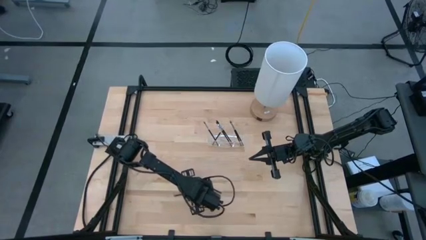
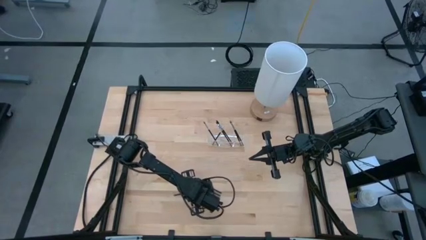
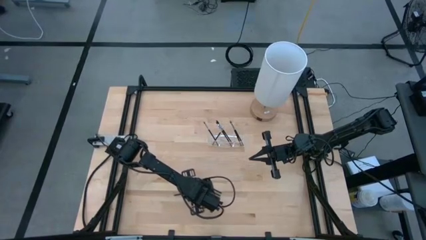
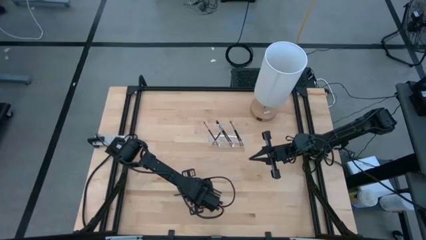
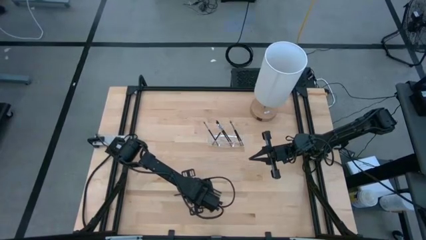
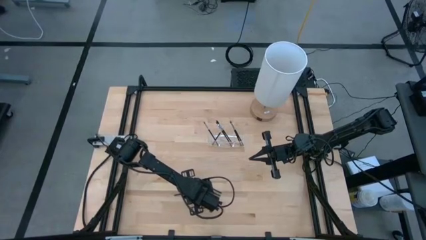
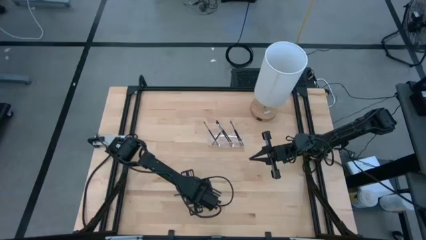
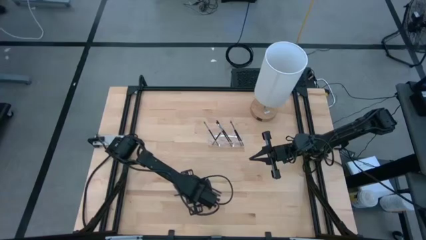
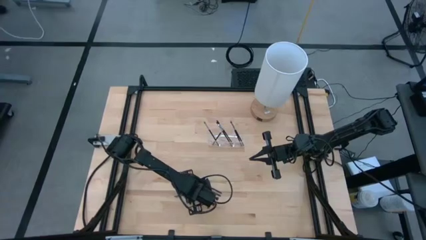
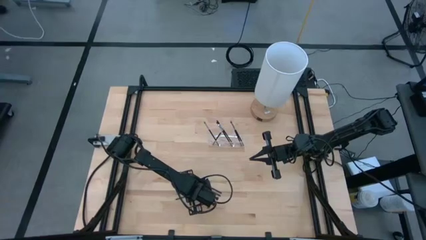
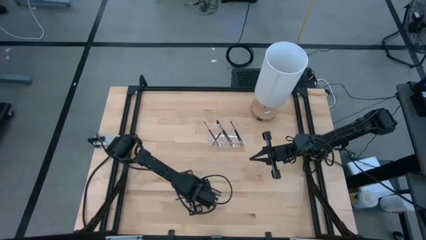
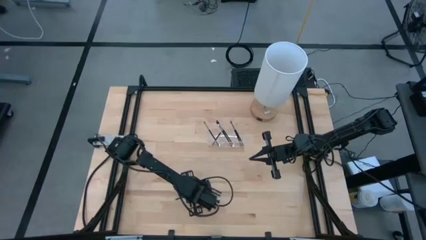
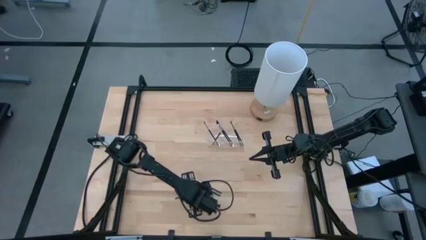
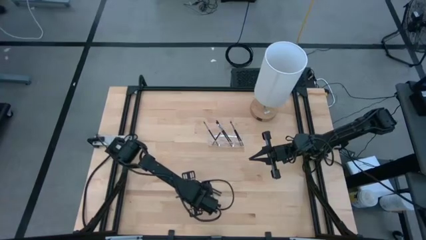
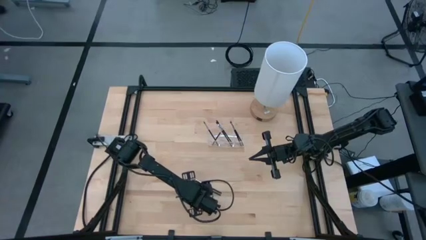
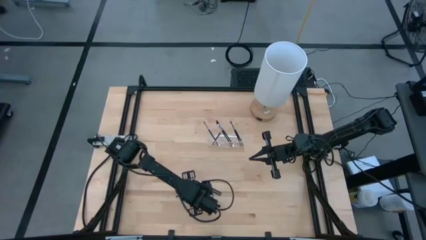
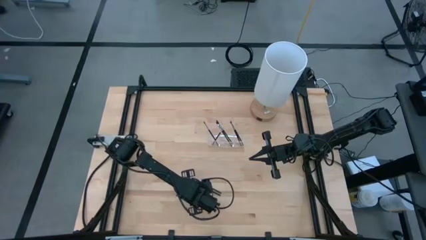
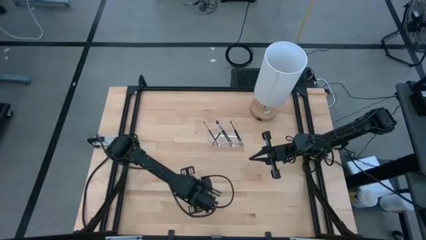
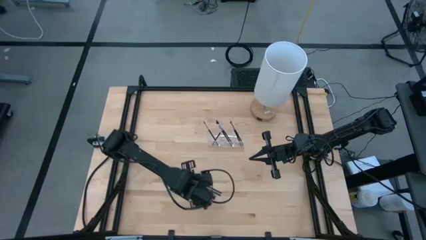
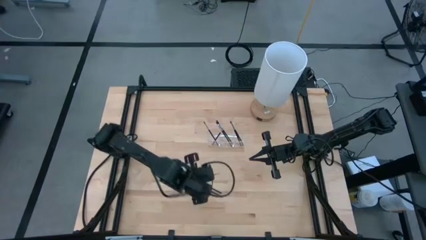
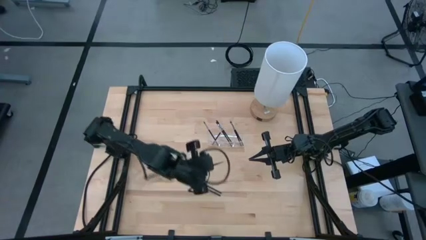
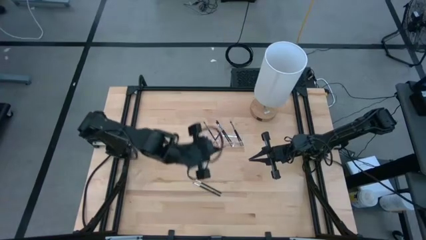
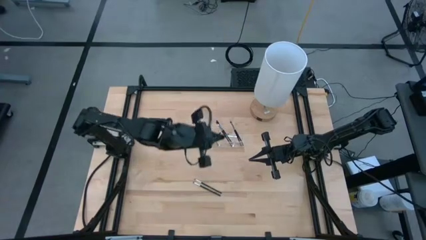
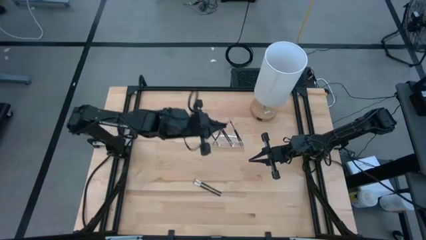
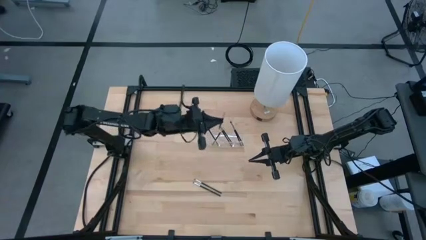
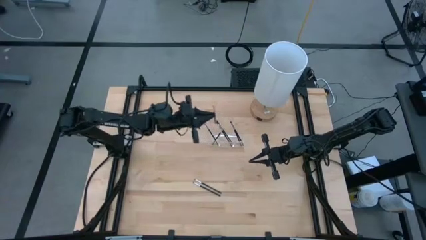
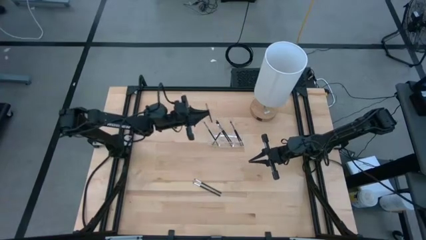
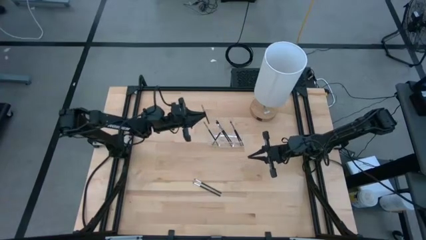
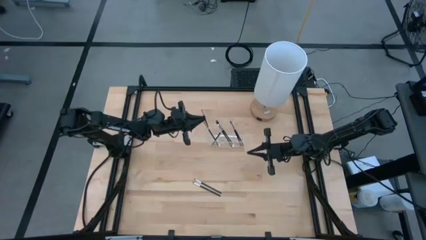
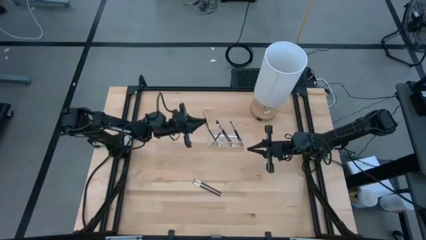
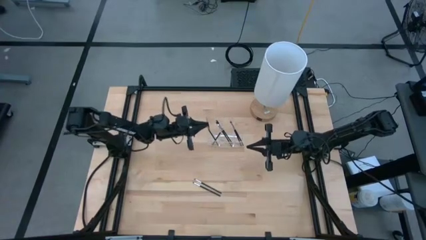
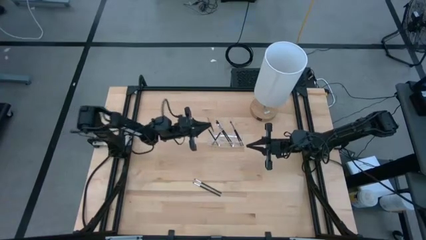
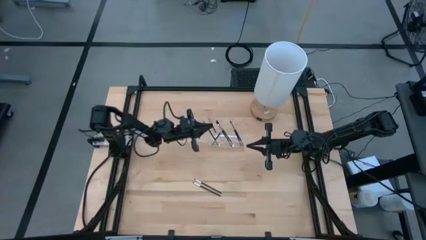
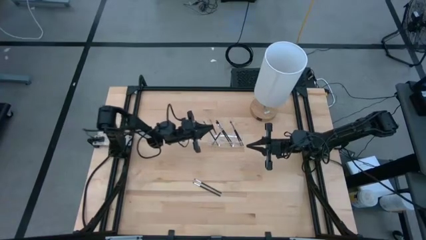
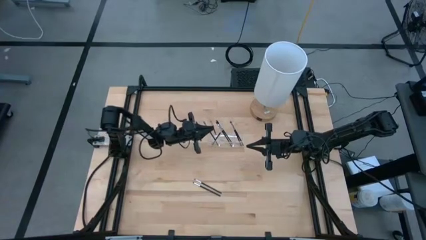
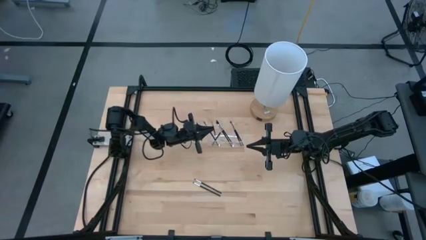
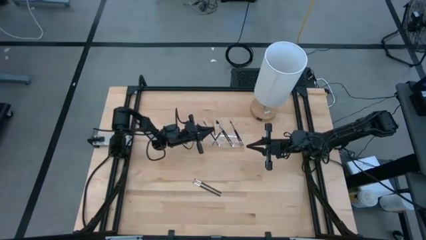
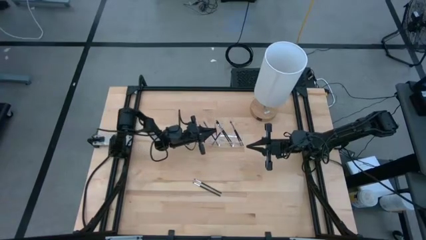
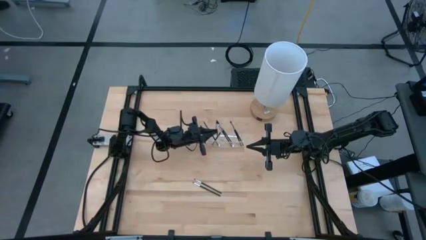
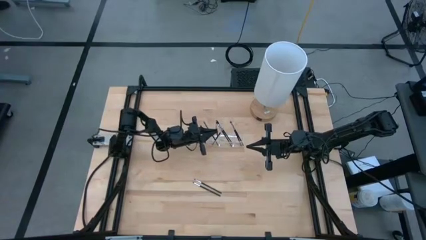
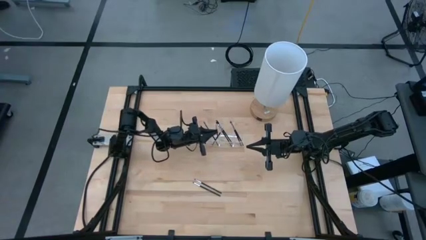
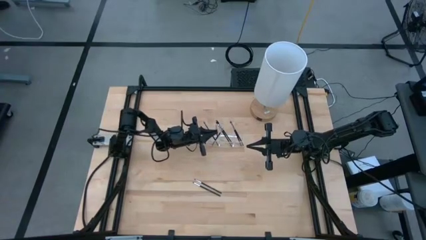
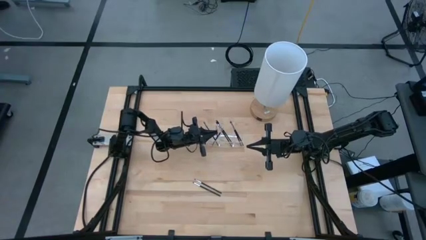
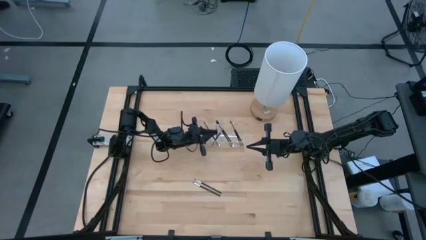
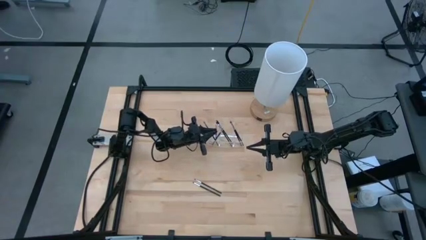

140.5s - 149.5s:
Task: Put items in baskets/containers
Put the black eyeshadow brush into the left section of the transparent organizer

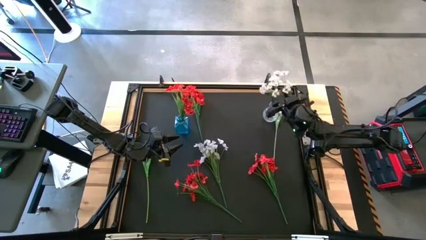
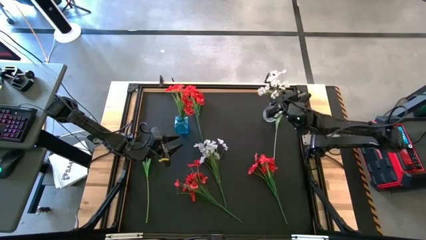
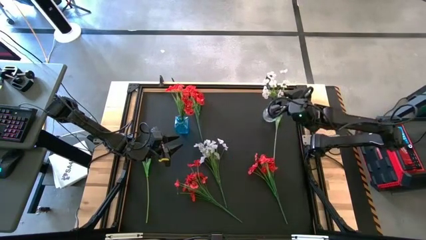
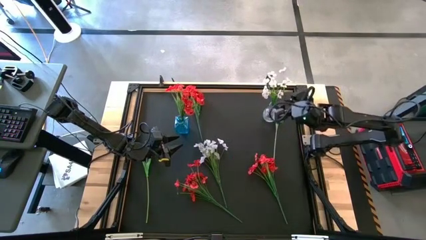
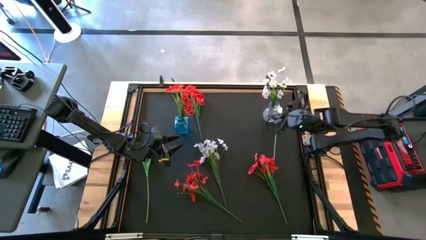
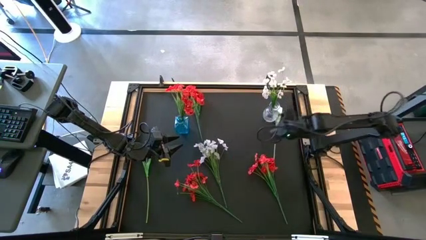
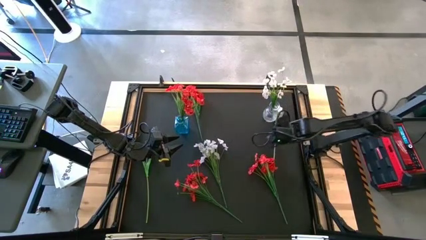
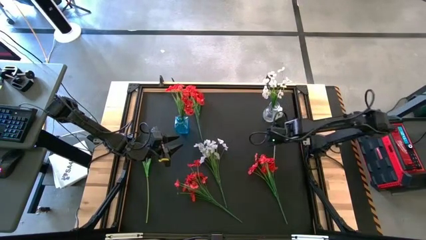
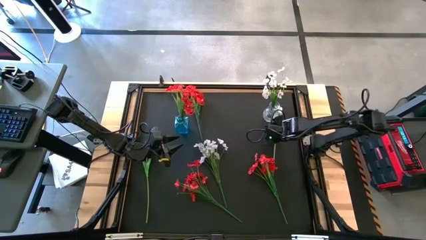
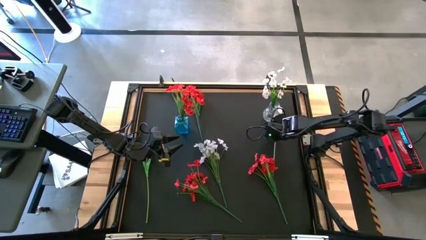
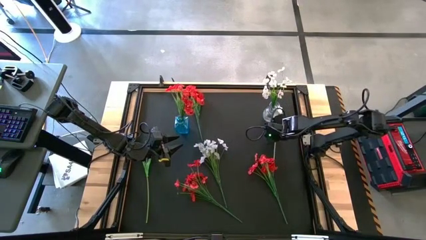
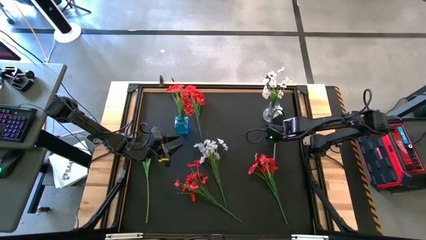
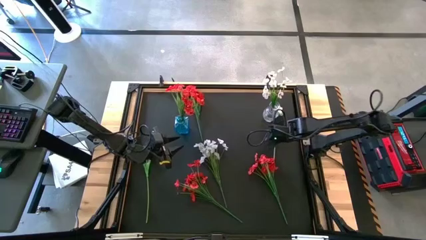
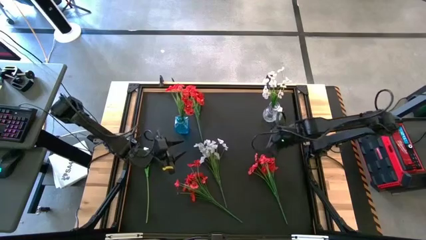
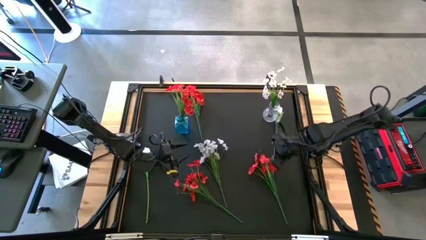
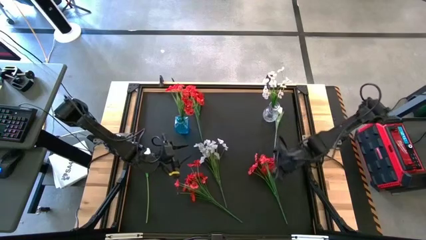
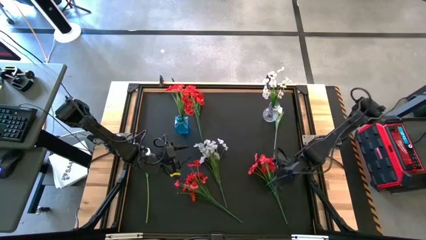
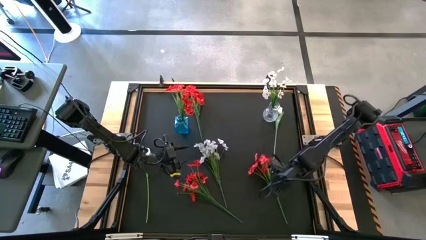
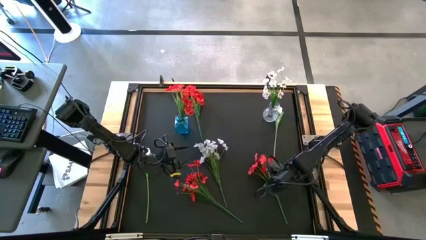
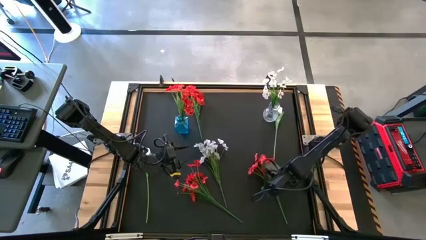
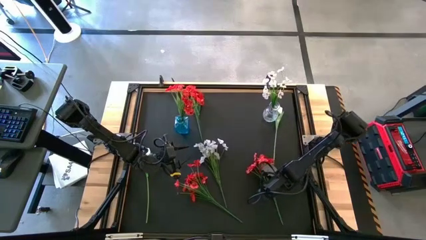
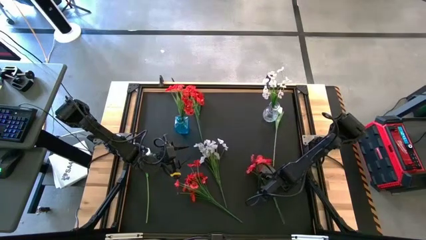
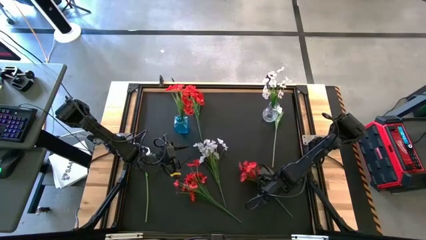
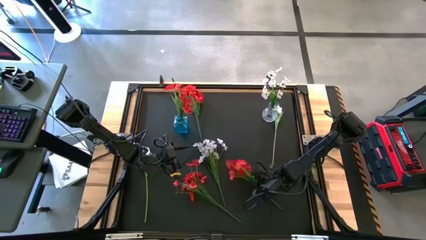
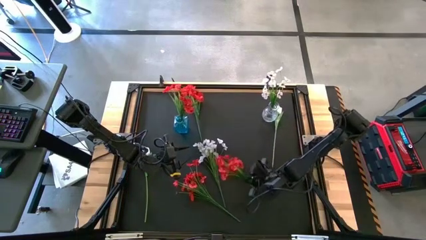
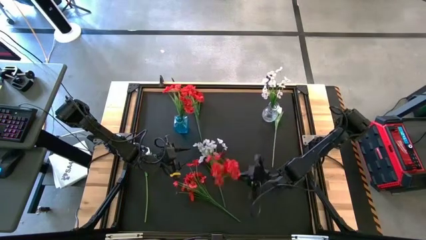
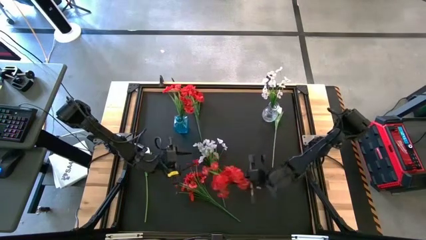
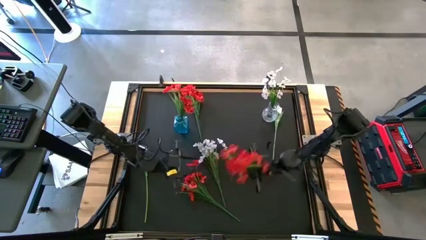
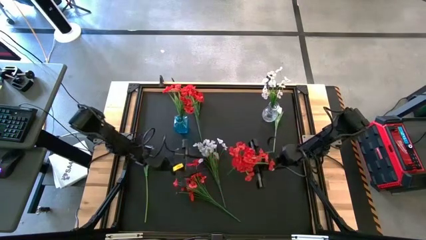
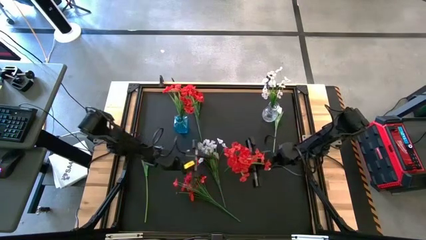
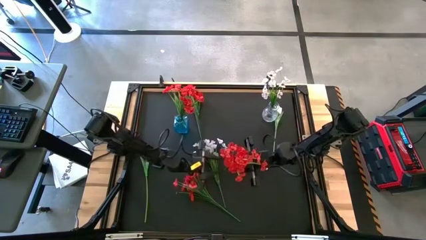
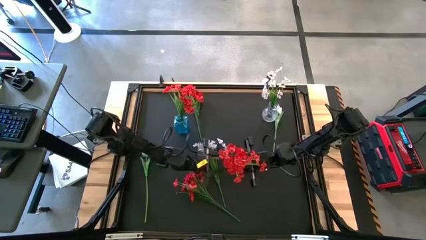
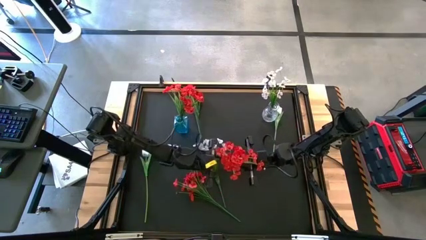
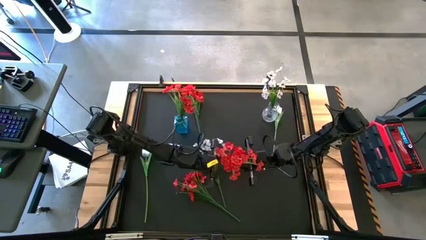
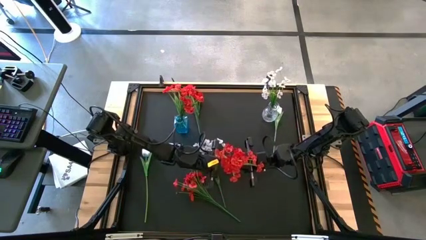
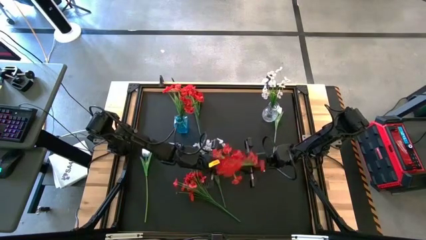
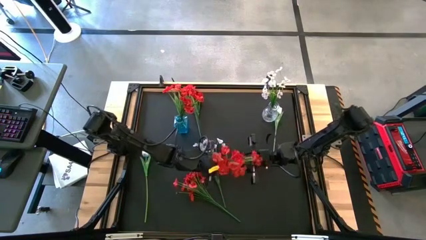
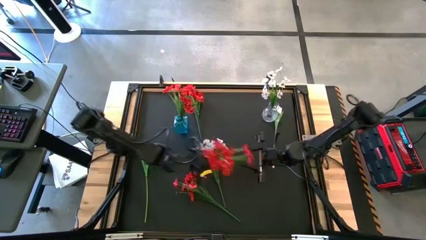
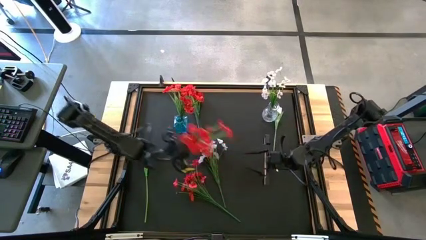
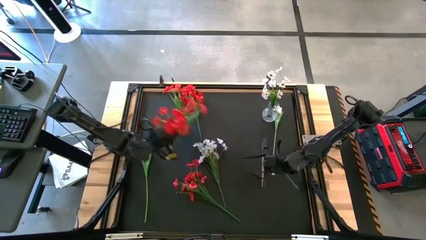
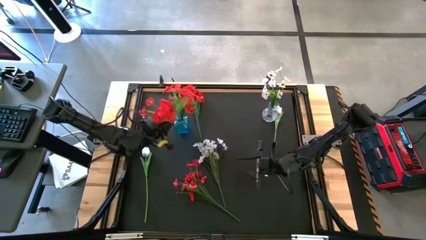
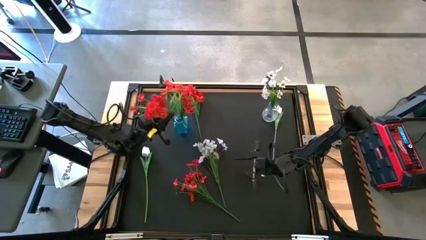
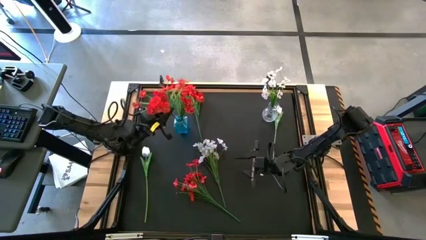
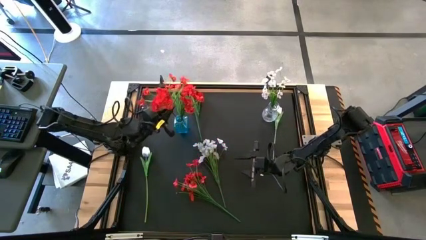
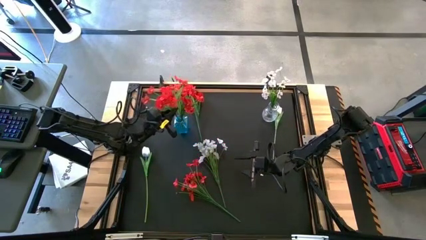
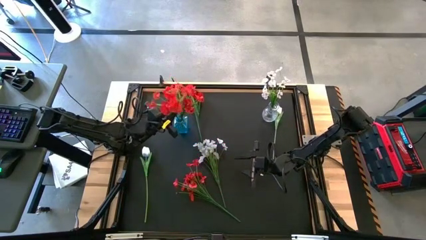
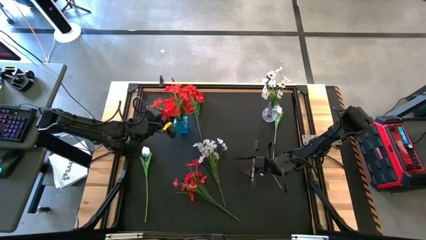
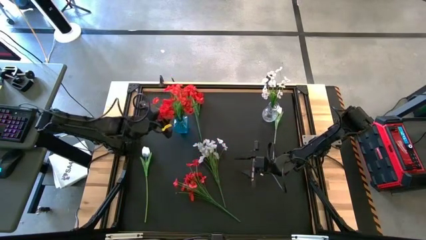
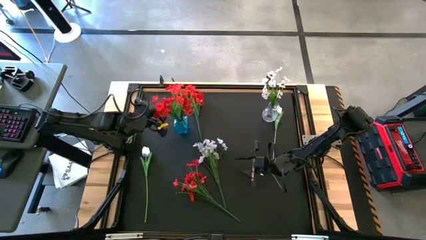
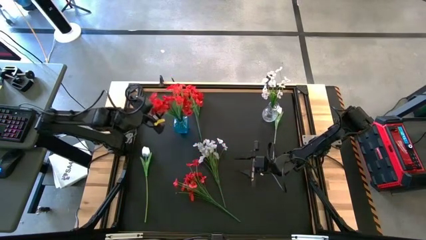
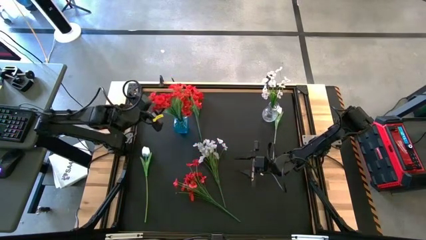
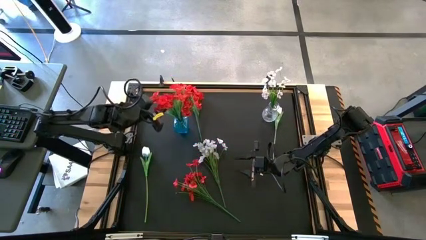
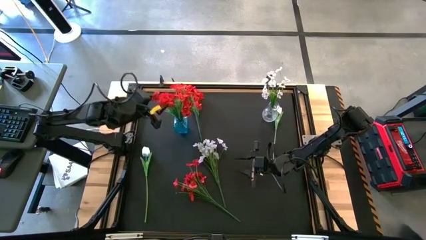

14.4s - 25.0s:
Task: Sort flowers into vase by color
Put the bottom right red flowers into the blue vase
